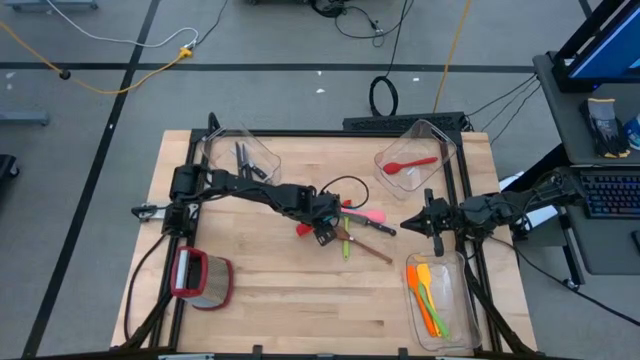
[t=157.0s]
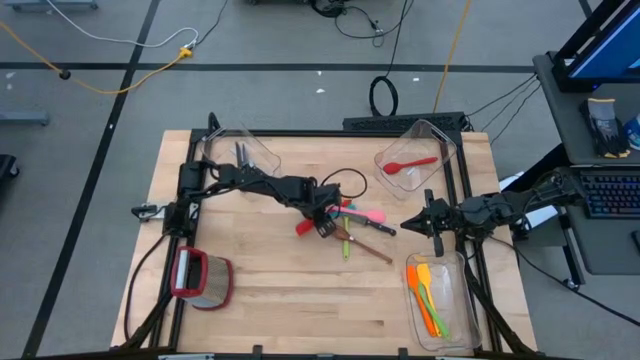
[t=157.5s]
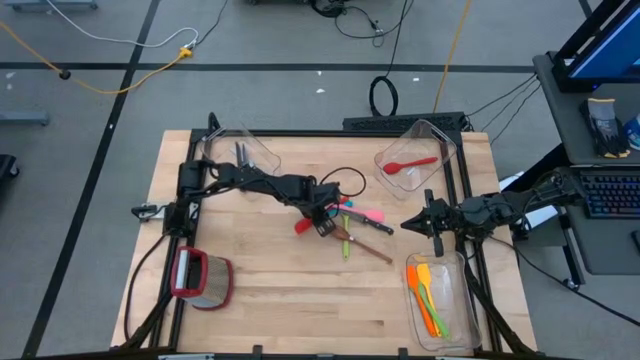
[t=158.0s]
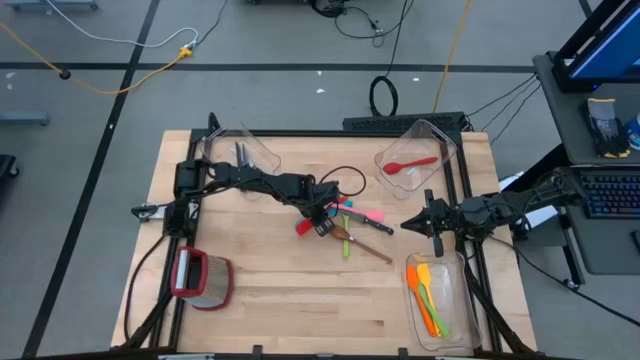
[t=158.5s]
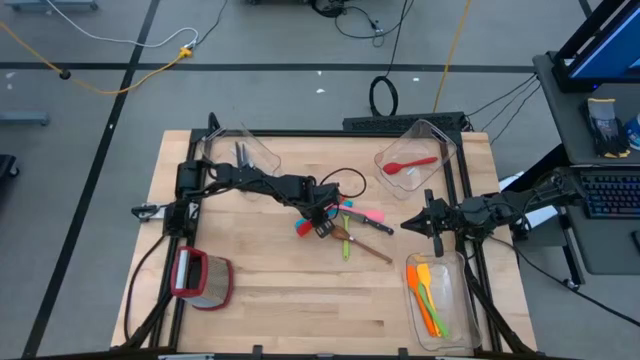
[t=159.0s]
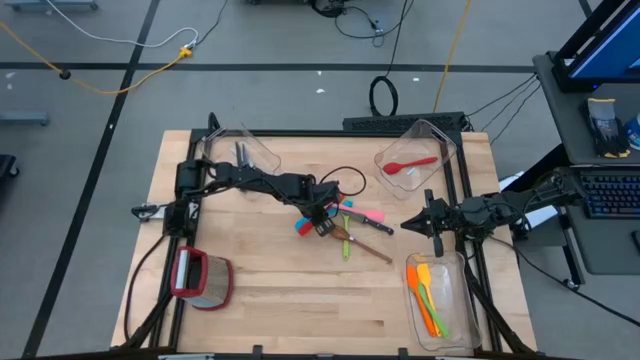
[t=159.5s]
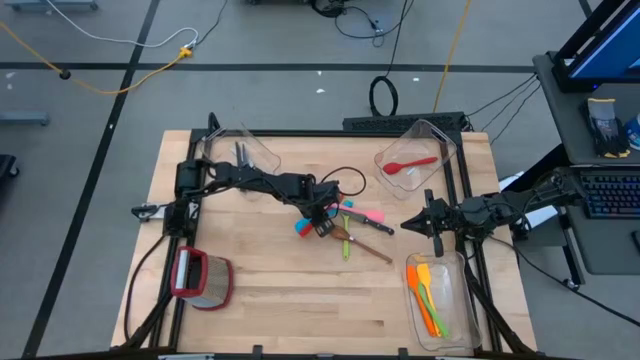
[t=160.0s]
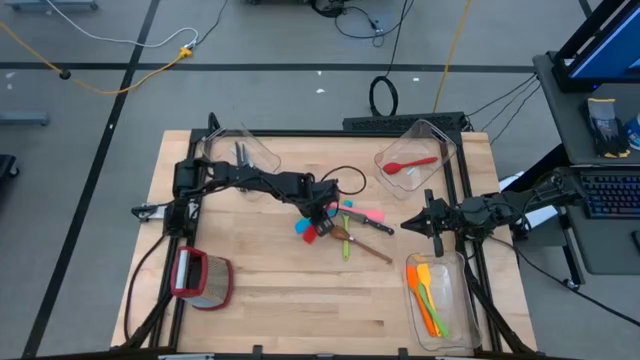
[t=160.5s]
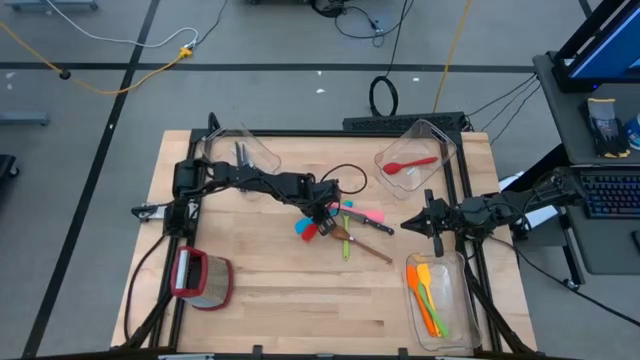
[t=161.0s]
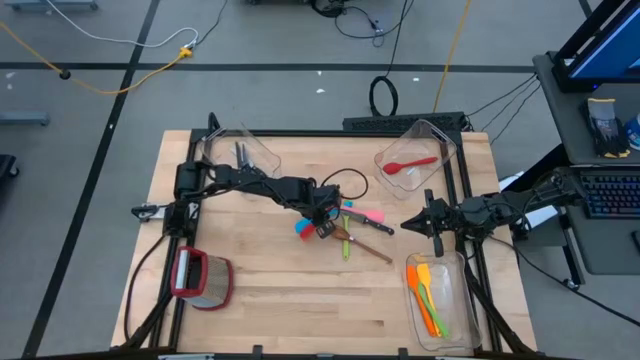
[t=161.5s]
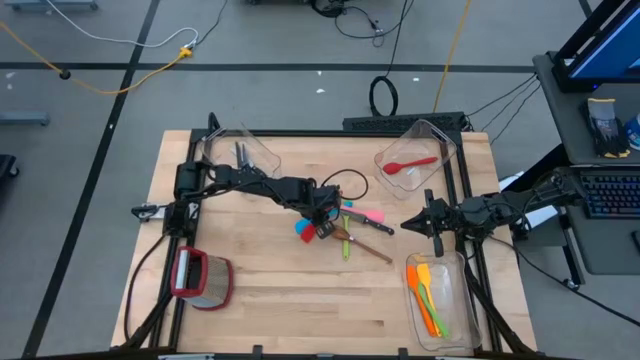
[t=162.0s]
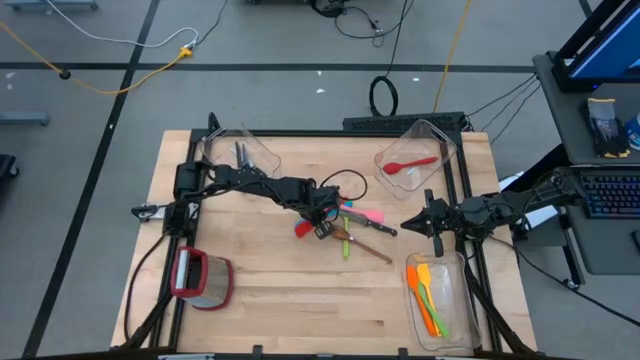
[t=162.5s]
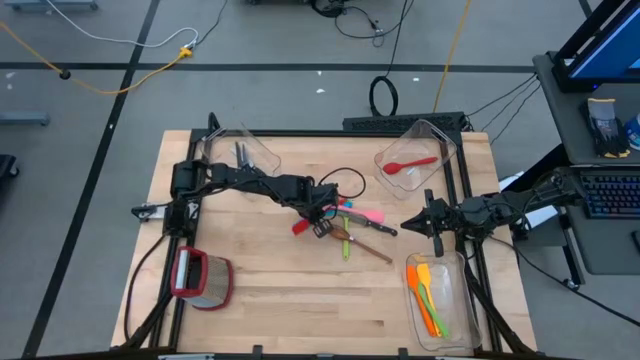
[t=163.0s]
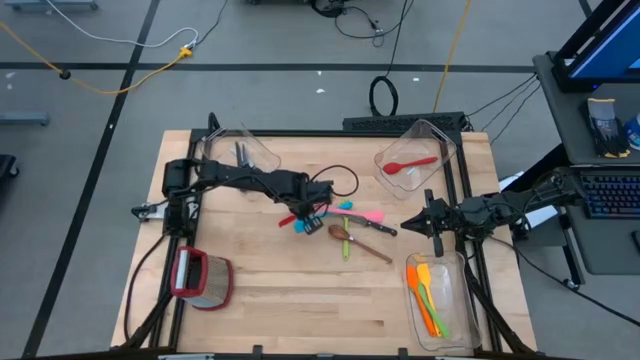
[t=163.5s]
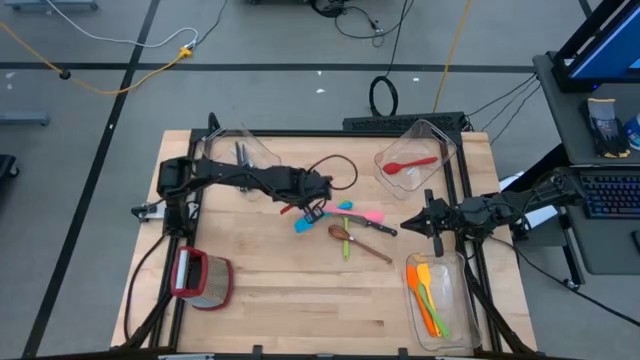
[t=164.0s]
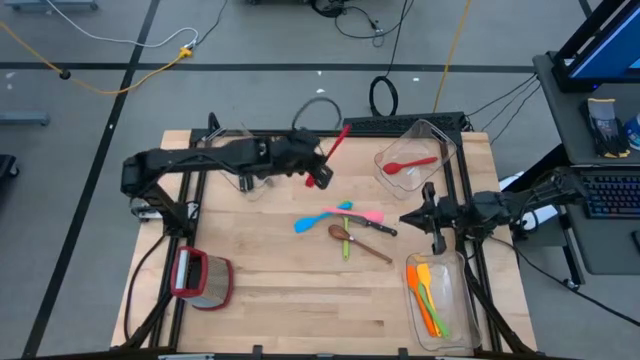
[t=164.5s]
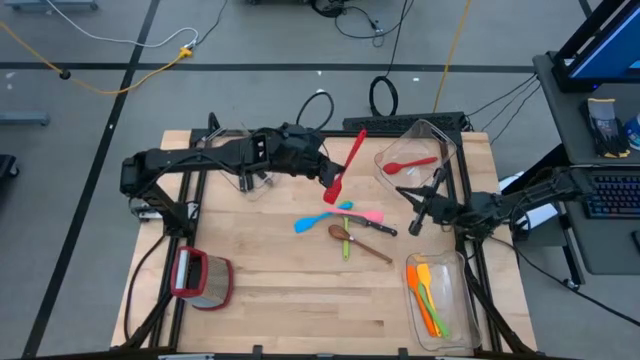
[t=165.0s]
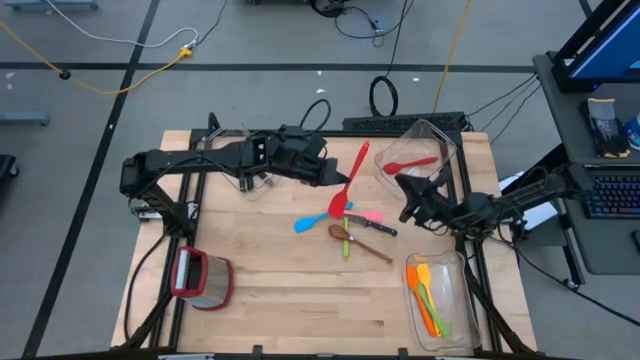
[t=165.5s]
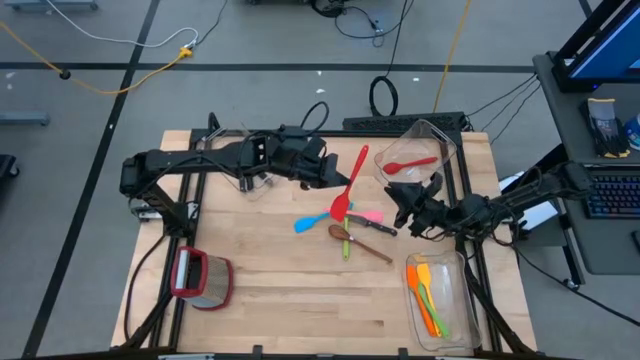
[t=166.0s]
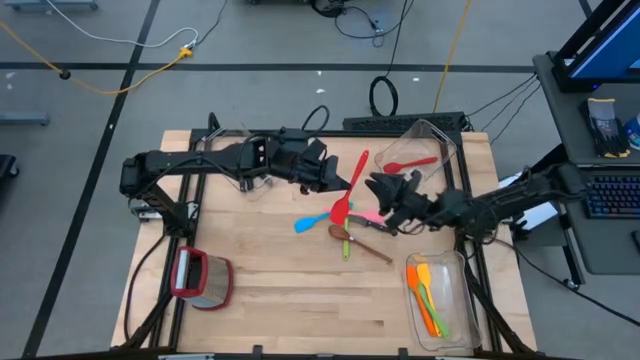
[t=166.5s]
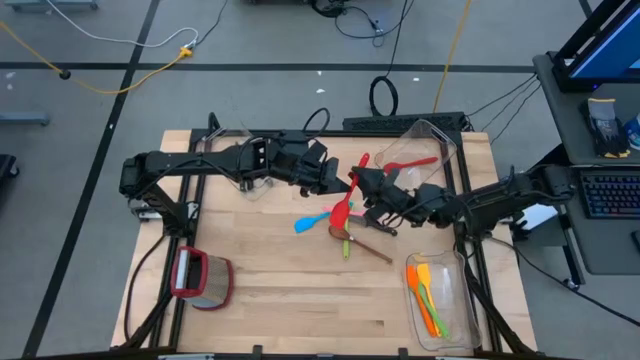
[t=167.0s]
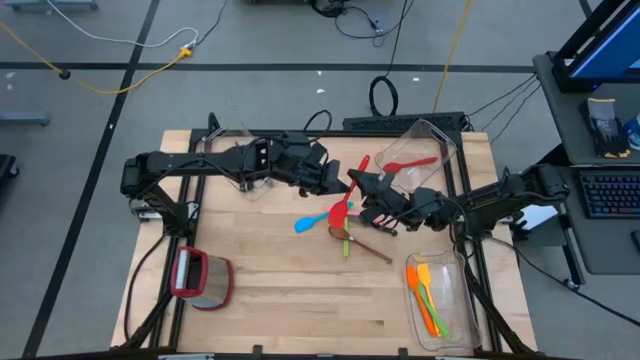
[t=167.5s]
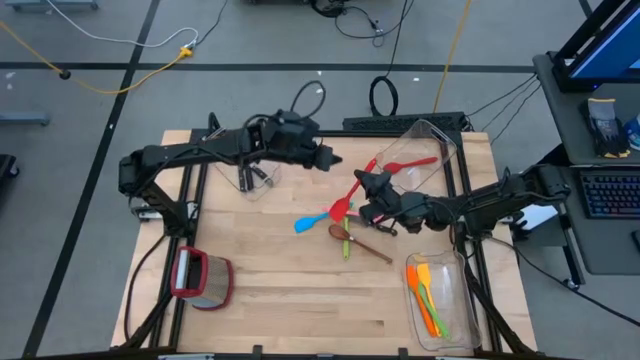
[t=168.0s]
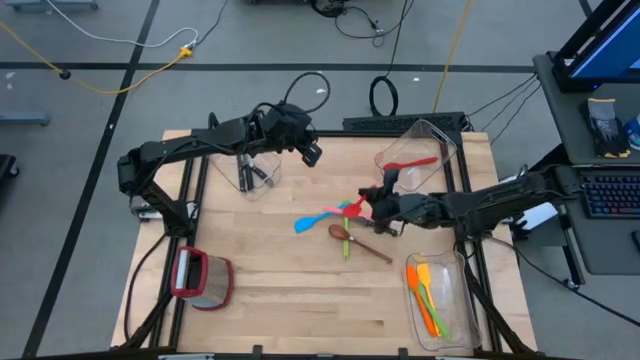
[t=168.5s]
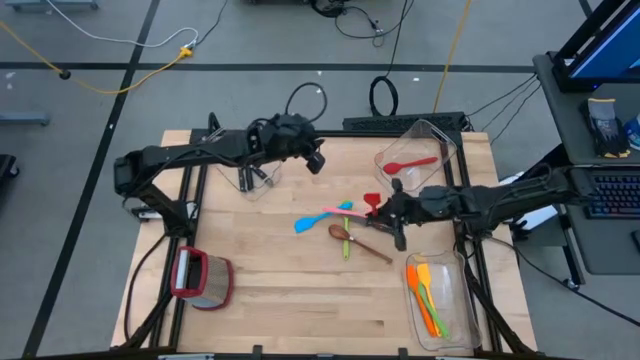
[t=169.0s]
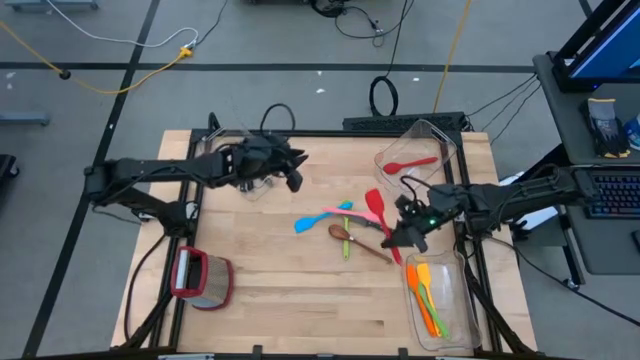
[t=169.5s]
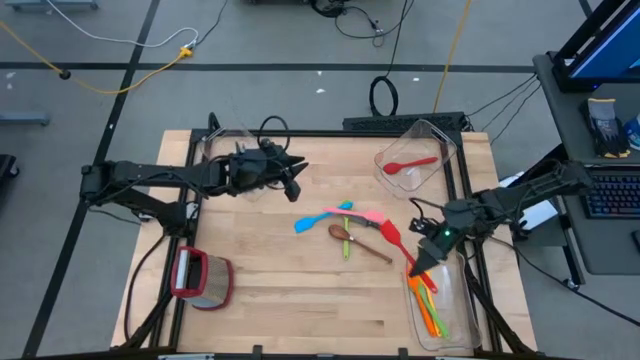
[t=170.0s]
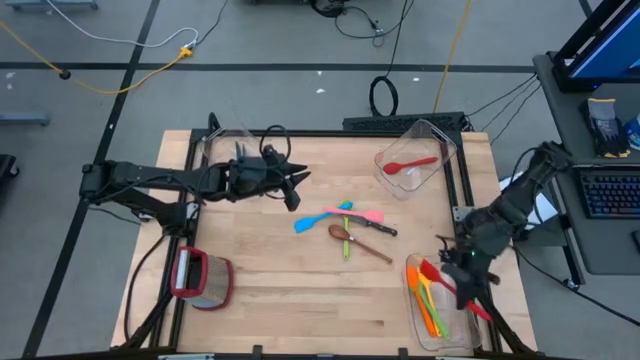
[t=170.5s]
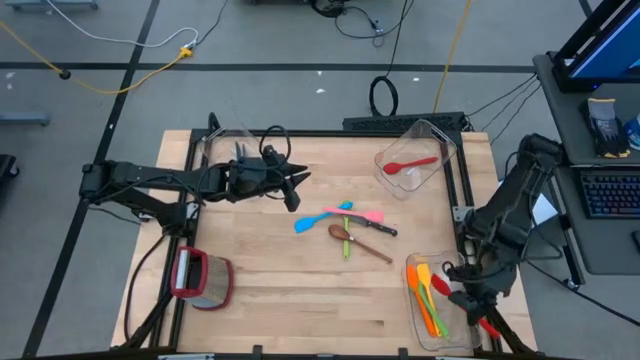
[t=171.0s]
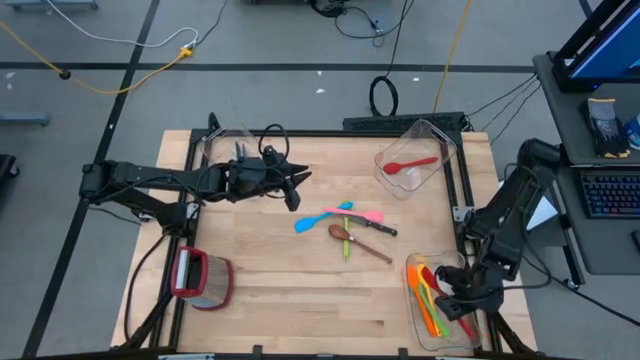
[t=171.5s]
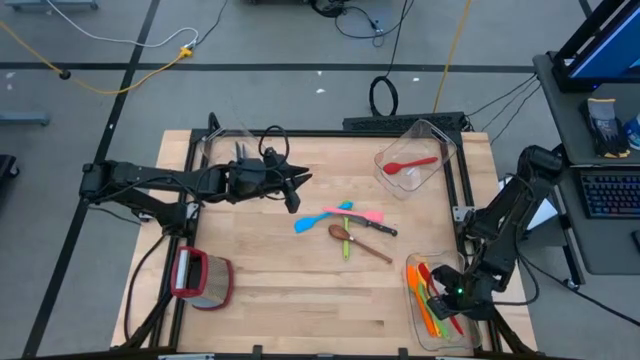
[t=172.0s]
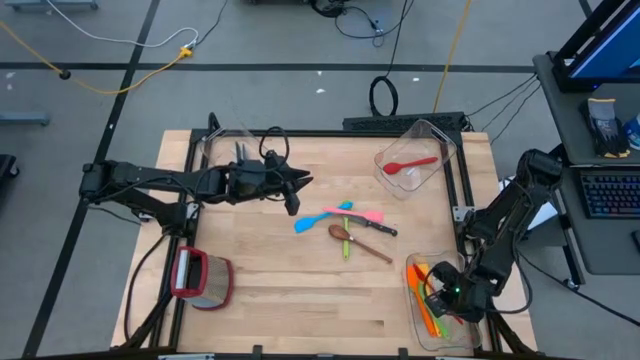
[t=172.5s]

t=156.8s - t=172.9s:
Task: Pick & Place Kitchen Items
Put the red spatula into the bottom transparent bin

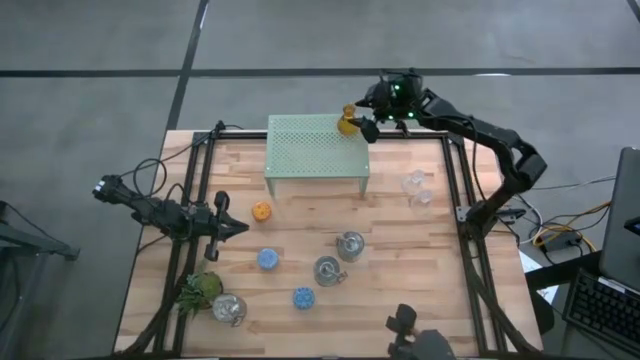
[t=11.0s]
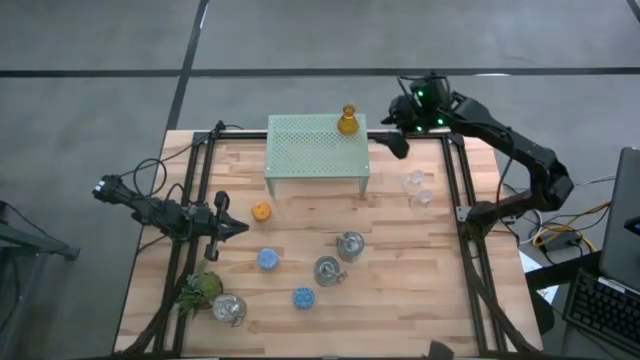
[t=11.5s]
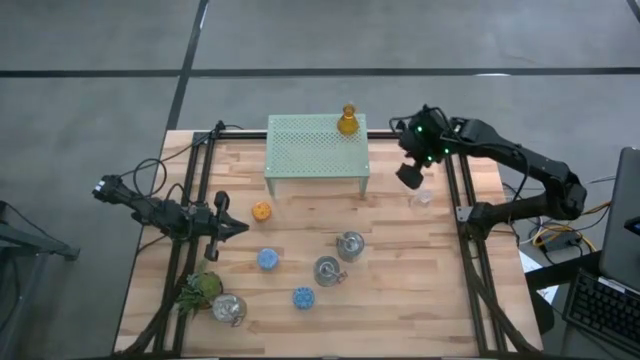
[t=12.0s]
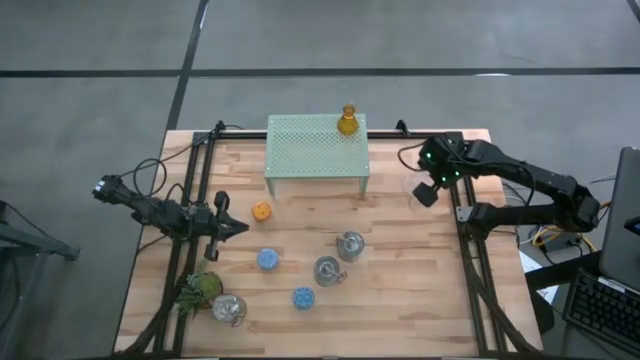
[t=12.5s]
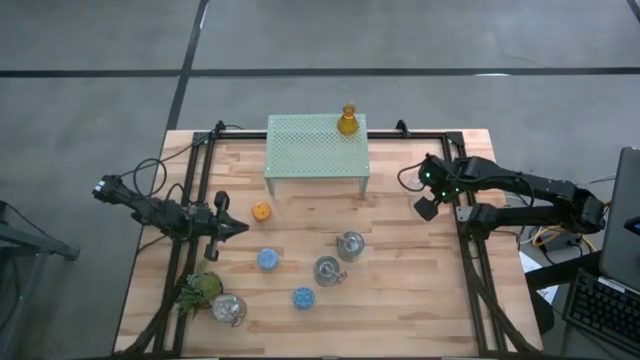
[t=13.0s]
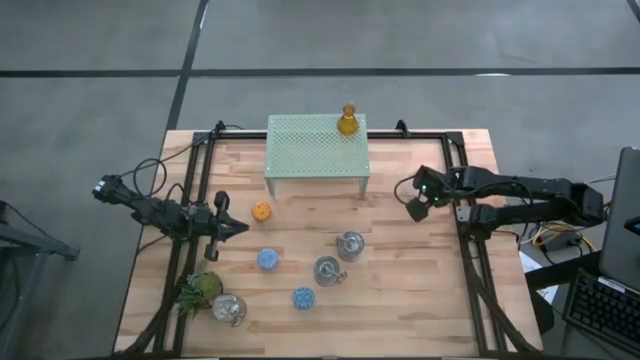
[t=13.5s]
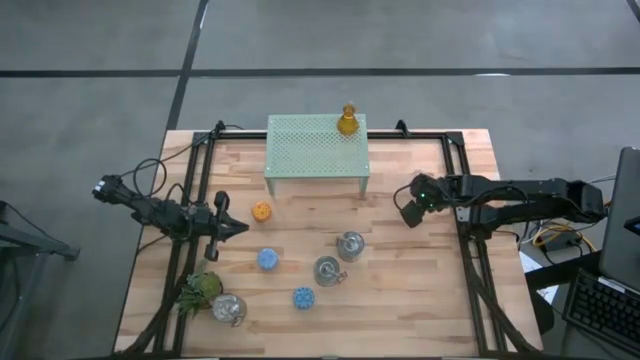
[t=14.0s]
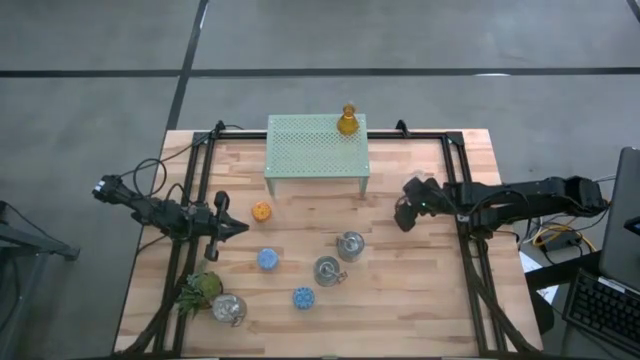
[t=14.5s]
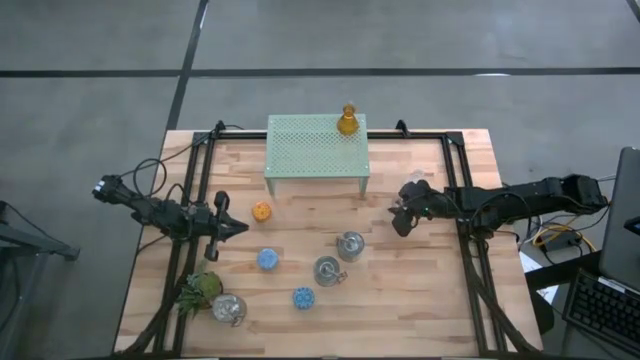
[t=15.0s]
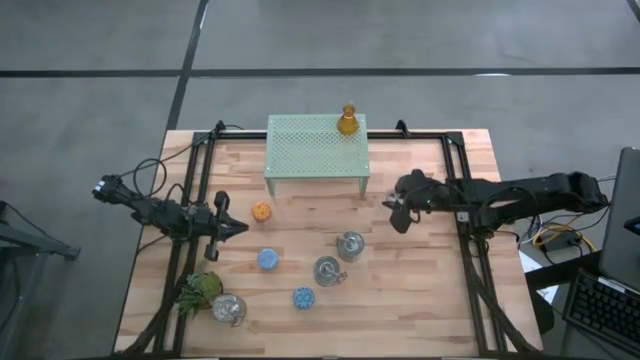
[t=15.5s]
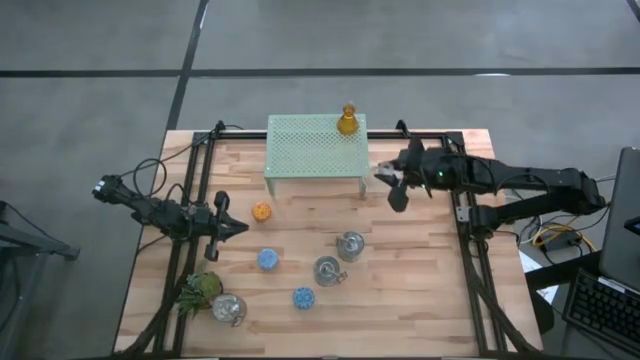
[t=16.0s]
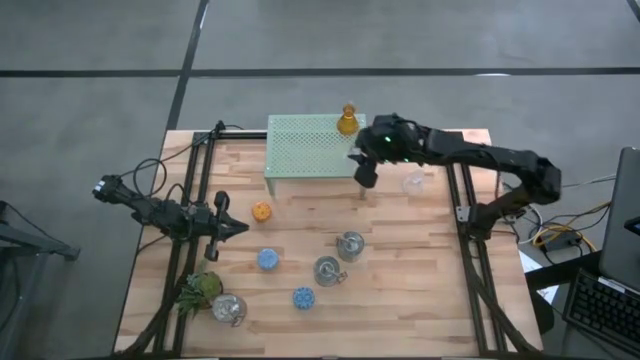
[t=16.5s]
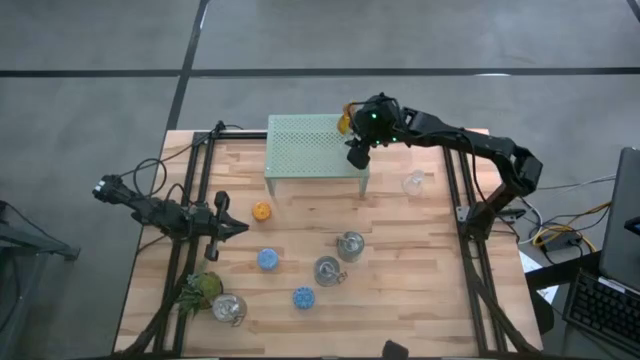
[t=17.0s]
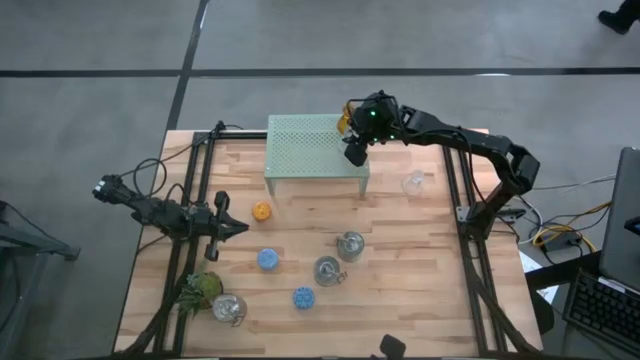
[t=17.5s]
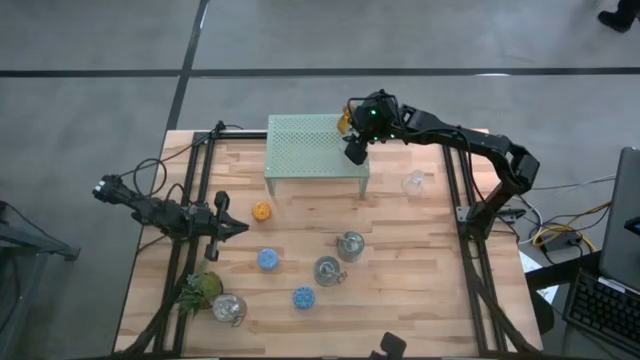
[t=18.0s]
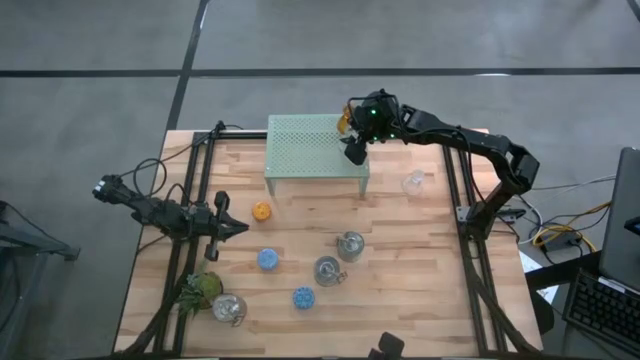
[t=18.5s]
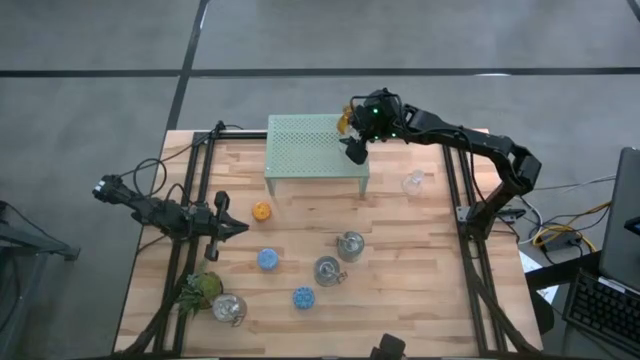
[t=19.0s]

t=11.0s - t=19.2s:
Task: Pick & Place candle stick holders
Put the bottom transparent glass candle holder on the shelf
